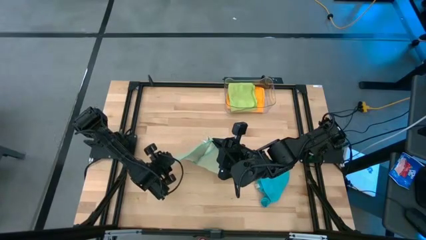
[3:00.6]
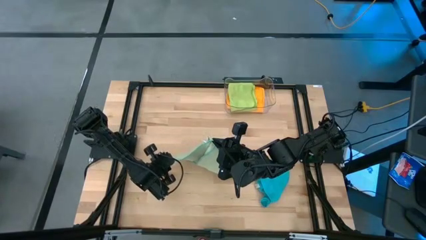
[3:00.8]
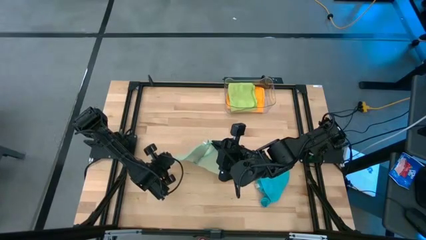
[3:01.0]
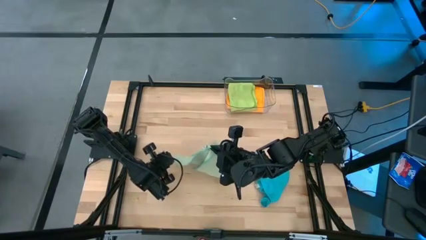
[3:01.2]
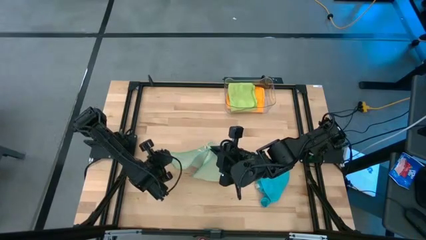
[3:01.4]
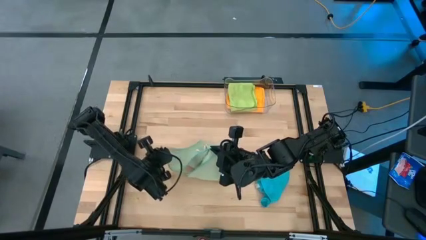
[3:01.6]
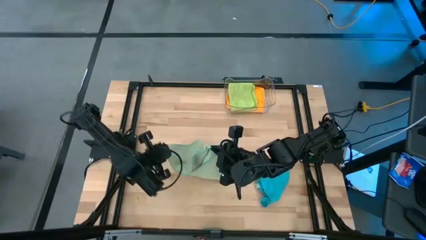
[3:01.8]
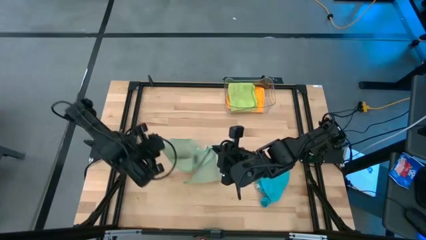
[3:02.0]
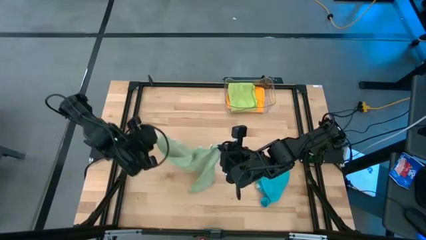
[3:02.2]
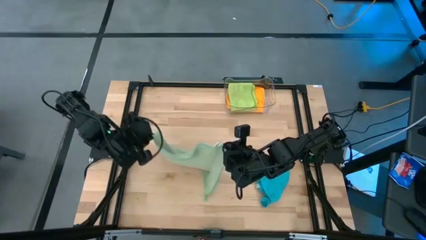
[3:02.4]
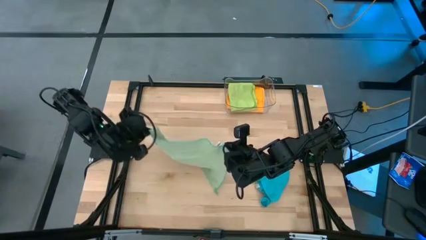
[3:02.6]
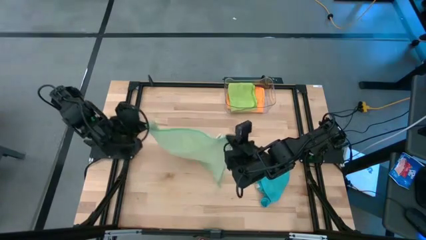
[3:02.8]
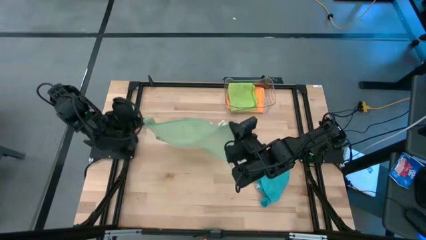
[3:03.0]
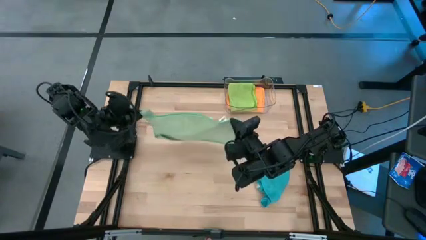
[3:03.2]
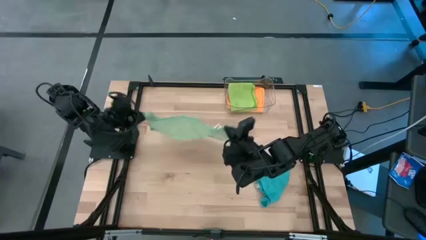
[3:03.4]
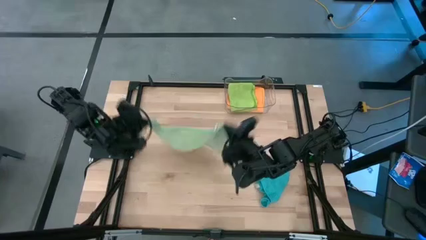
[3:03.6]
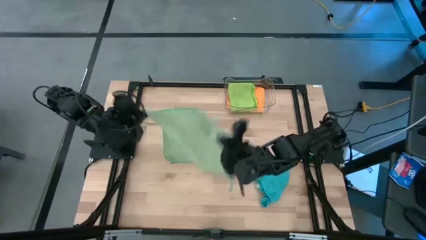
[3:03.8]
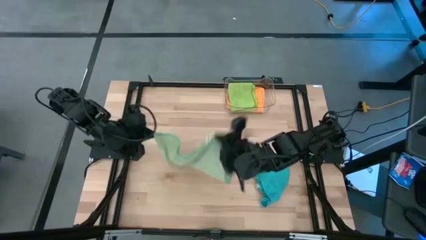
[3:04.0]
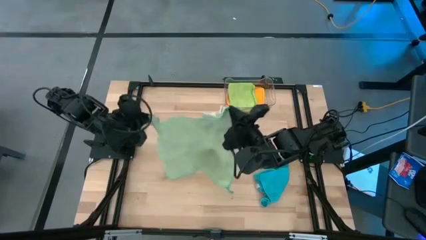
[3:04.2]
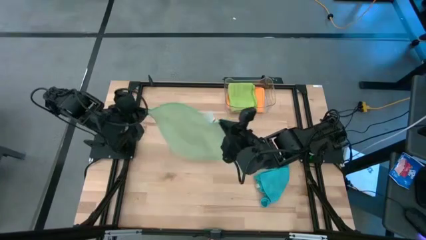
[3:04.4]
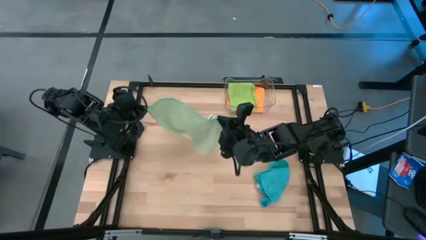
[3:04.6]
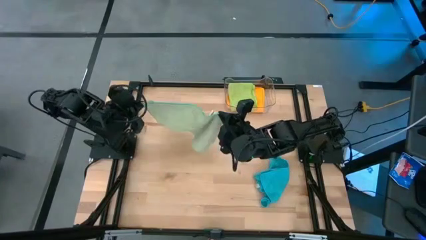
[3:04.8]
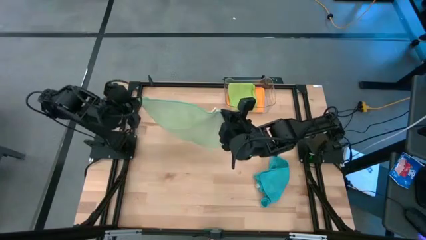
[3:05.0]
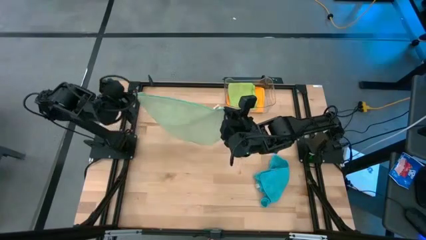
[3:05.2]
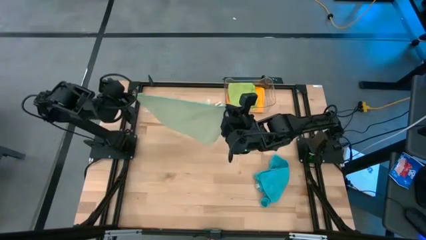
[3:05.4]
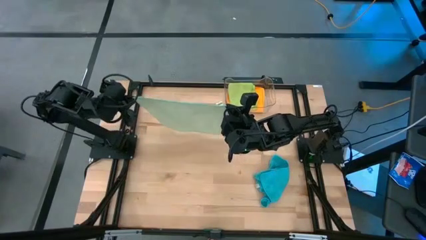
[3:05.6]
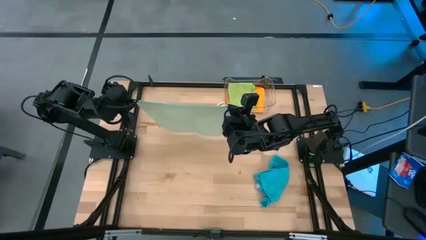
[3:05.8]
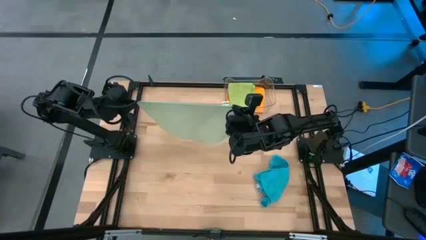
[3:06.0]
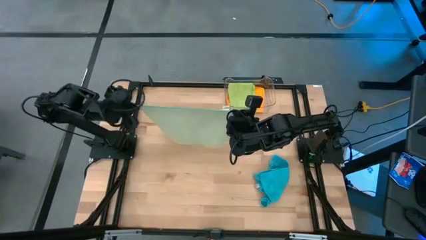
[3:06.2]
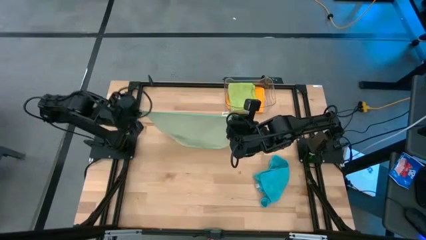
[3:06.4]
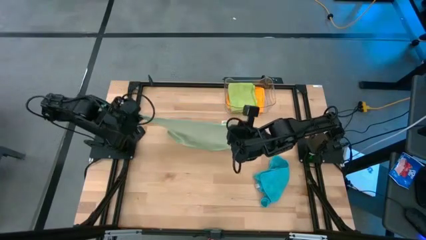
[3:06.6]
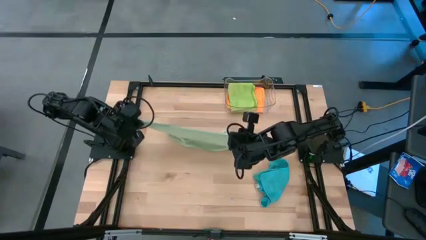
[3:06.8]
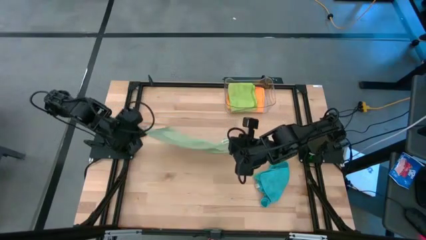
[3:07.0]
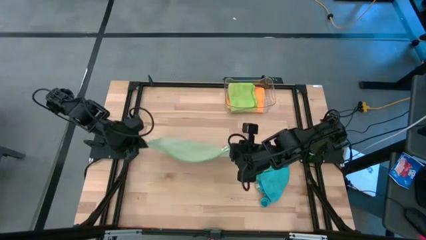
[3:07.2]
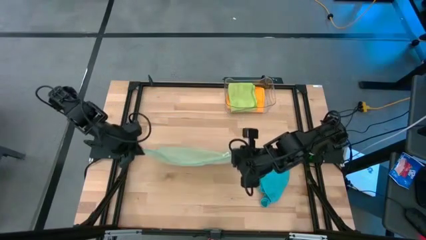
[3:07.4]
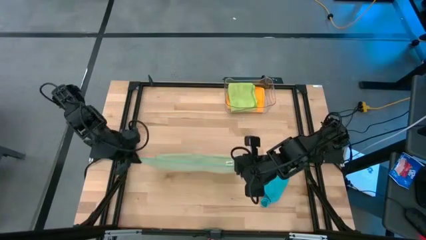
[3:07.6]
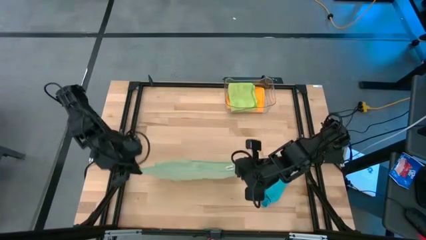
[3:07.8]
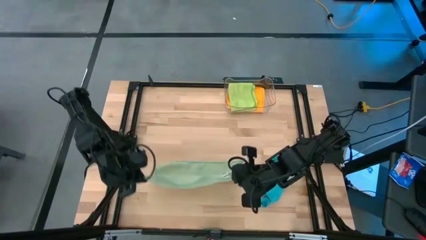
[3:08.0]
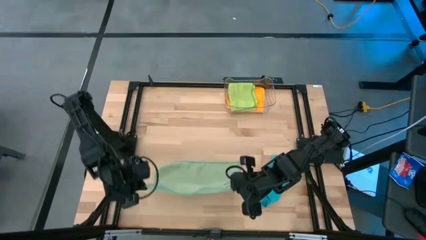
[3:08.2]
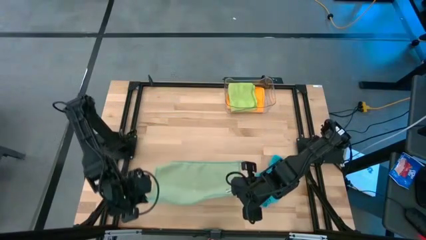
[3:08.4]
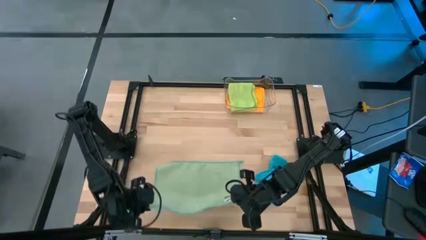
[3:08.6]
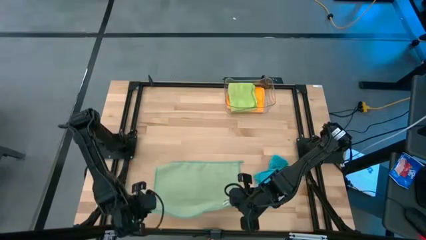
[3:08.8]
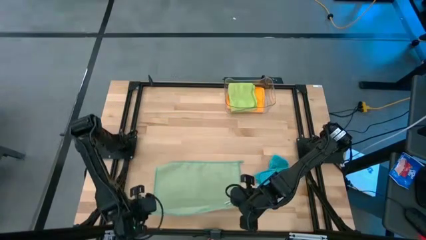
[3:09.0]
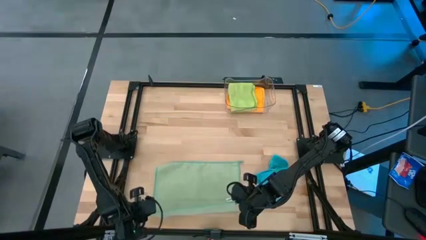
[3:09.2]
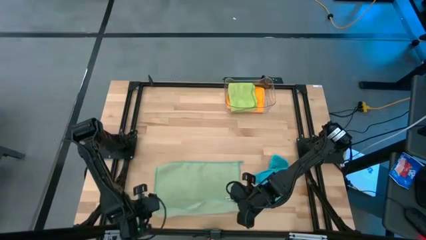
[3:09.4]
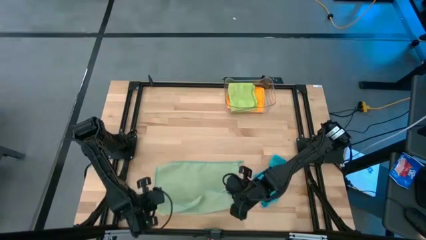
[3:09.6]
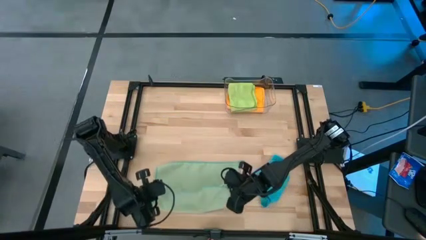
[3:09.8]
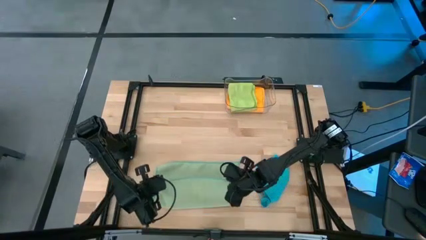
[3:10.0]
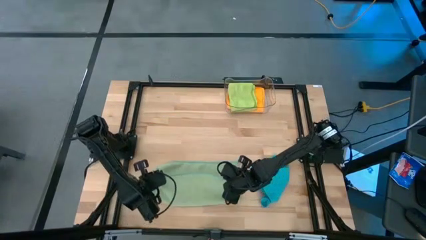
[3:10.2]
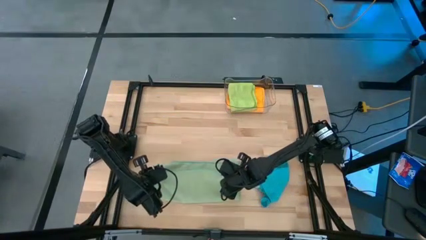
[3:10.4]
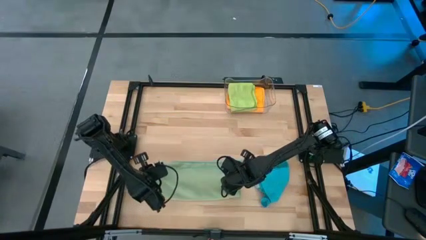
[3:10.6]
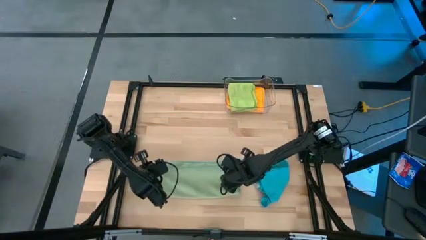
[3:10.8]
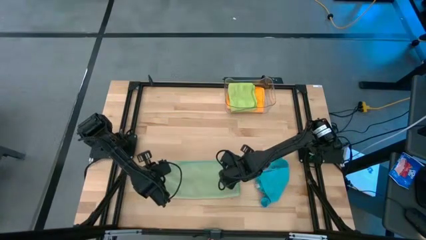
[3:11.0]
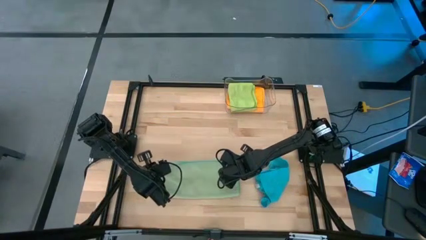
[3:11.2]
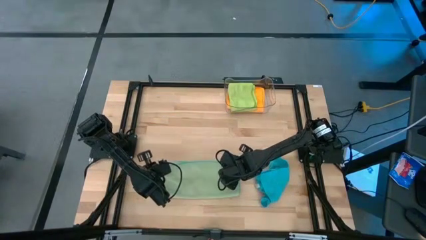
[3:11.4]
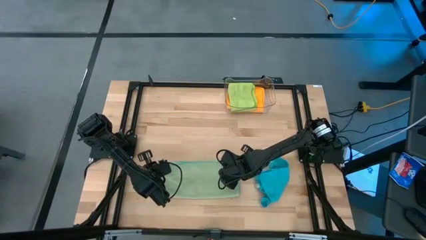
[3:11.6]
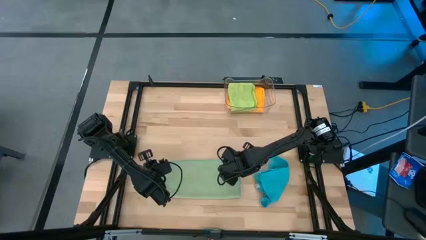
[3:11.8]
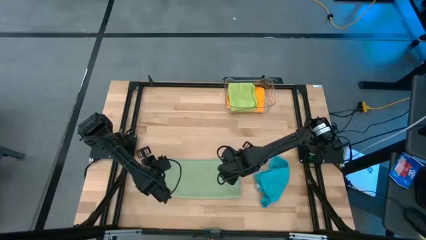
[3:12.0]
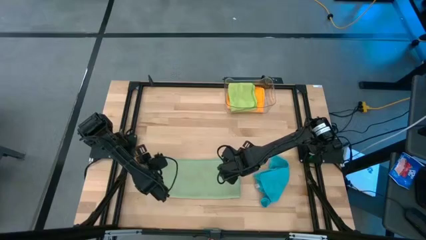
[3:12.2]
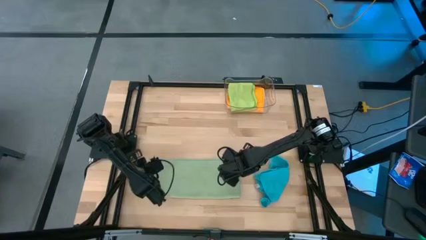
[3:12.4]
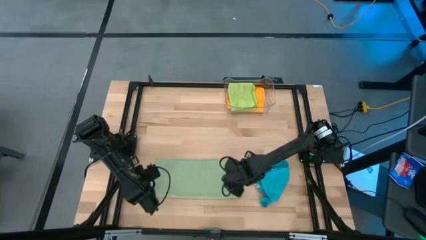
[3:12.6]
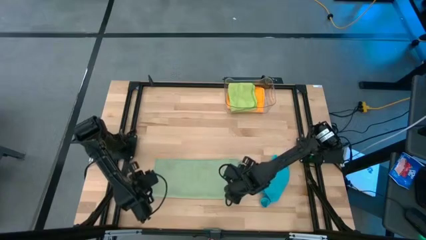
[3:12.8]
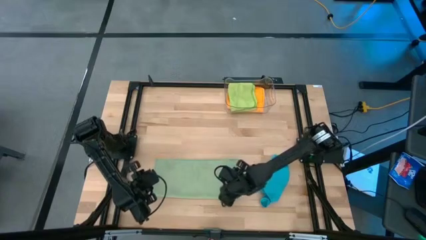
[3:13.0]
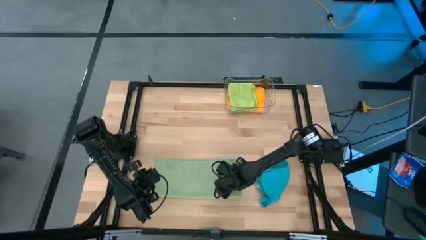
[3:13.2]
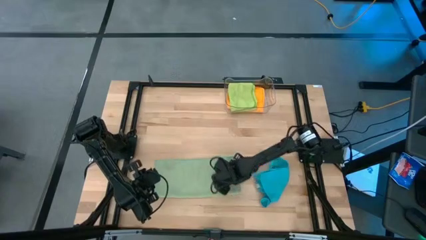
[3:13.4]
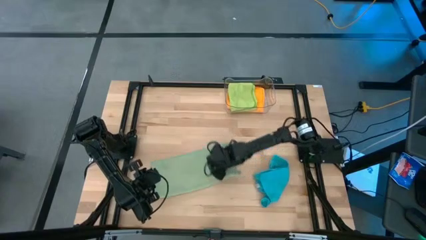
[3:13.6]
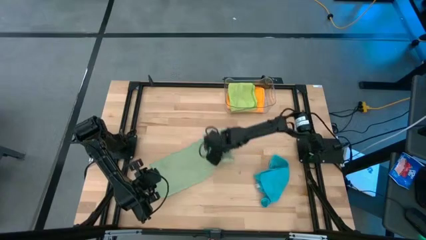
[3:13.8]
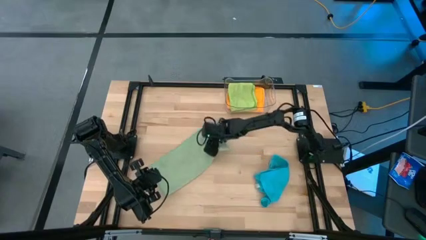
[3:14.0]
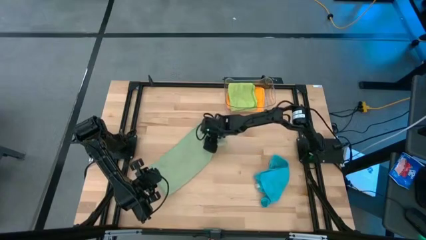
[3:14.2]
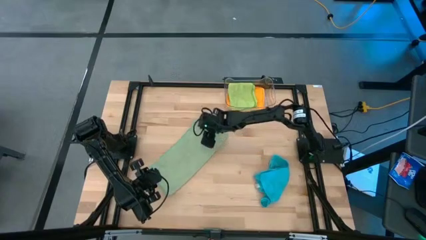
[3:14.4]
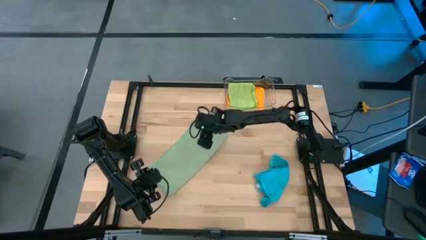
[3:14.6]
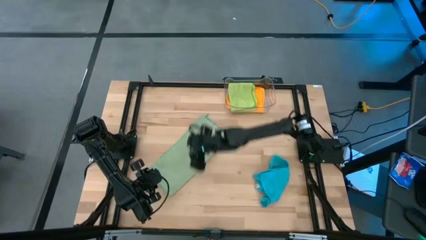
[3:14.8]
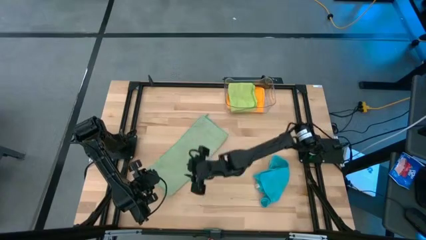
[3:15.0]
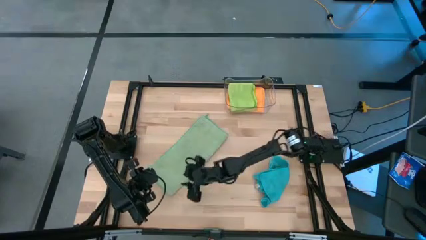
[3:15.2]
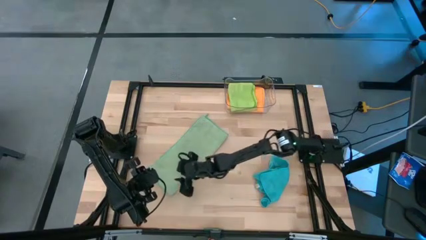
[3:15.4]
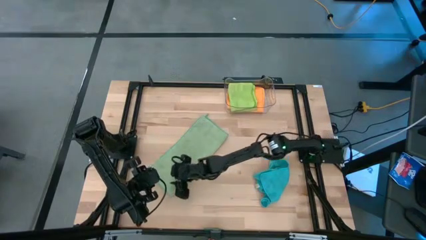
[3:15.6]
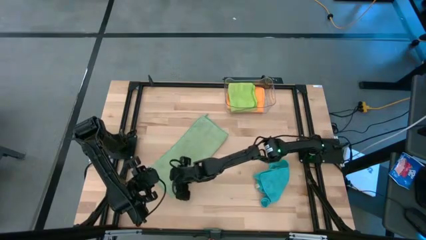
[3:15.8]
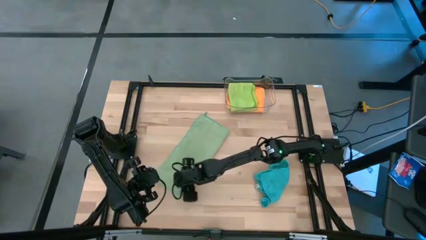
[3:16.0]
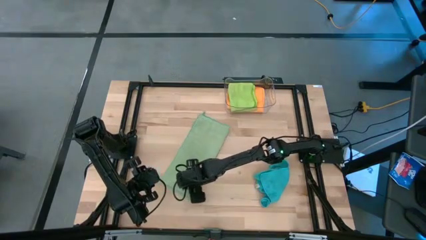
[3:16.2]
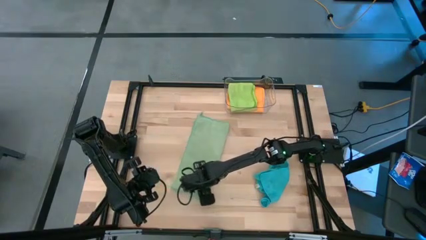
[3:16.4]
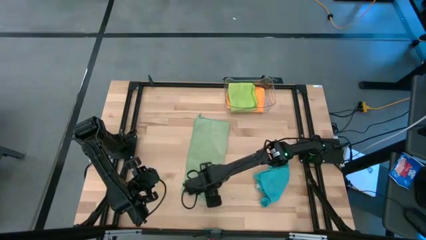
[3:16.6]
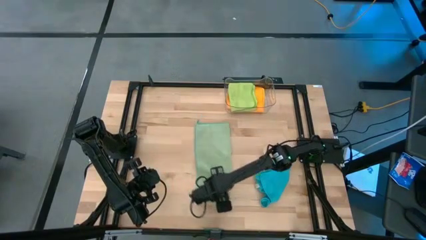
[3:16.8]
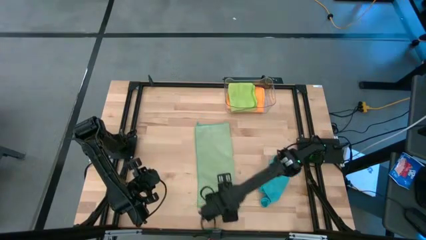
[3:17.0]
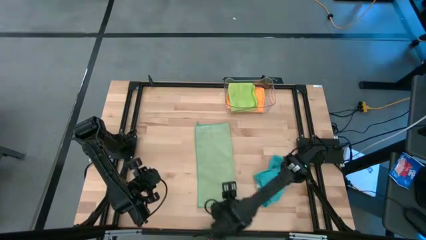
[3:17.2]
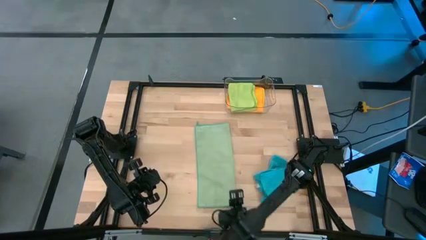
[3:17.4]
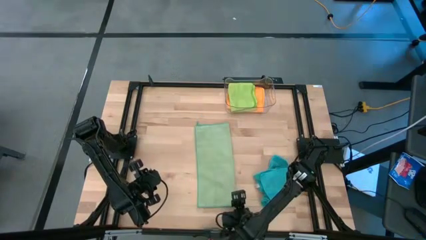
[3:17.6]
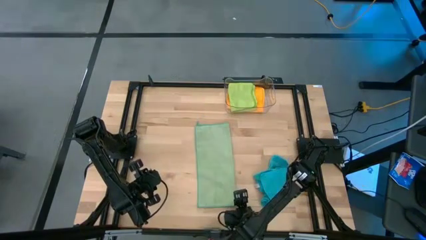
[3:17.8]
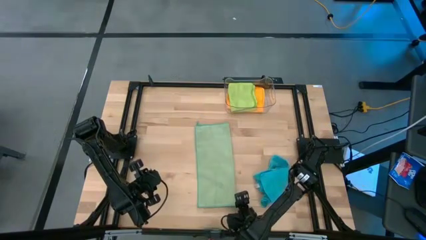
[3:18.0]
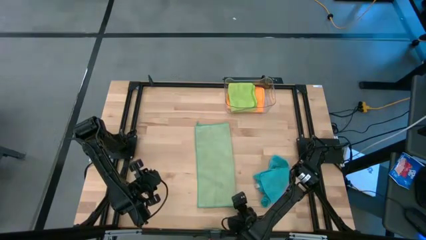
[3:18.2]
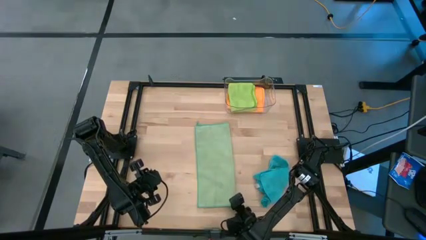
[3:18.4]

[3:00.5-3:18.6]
Task: Fold microfiber towels
Fold the green microfiber towel
